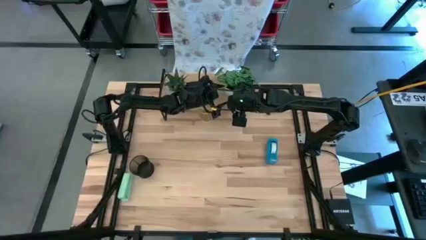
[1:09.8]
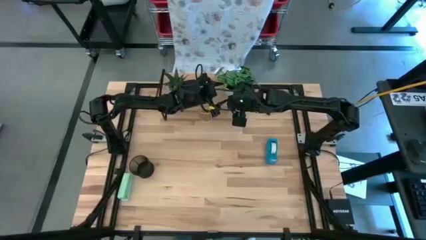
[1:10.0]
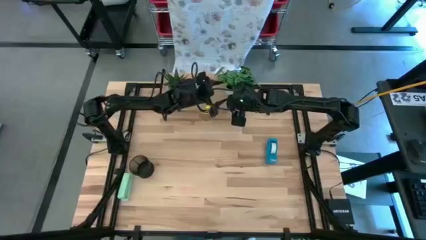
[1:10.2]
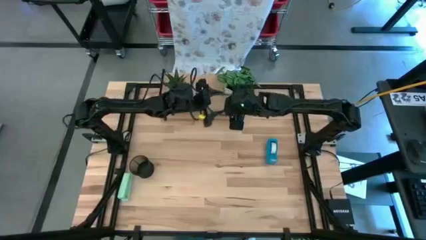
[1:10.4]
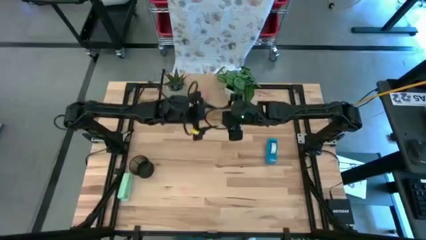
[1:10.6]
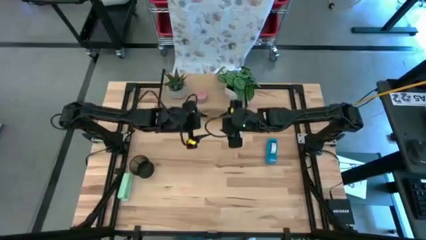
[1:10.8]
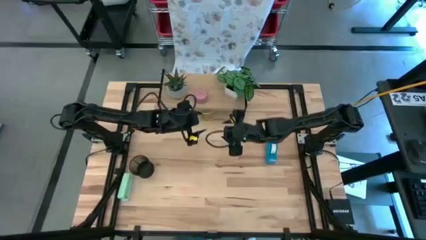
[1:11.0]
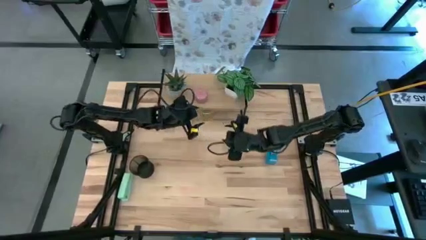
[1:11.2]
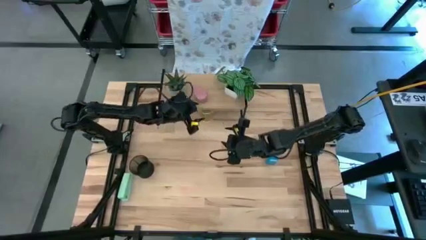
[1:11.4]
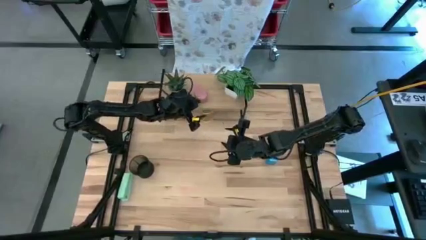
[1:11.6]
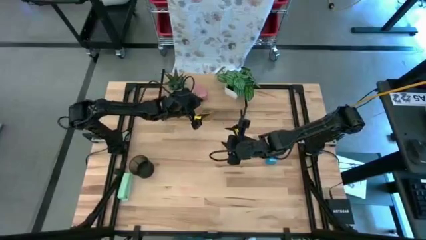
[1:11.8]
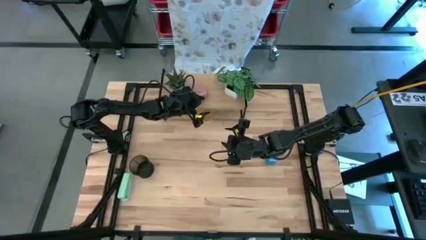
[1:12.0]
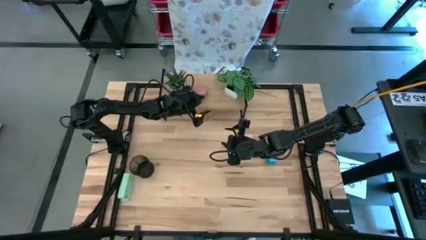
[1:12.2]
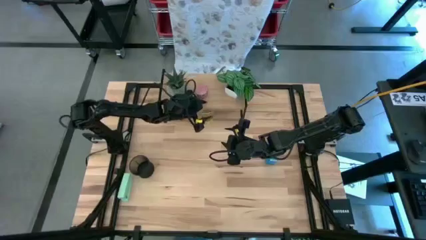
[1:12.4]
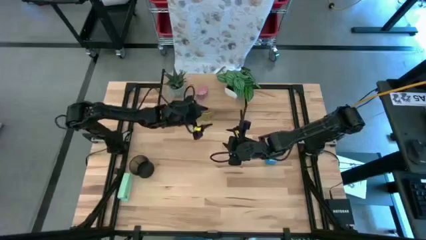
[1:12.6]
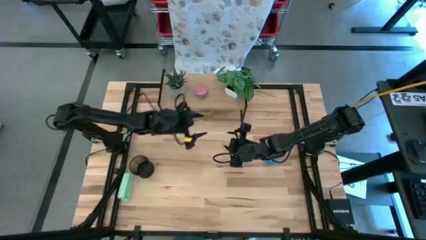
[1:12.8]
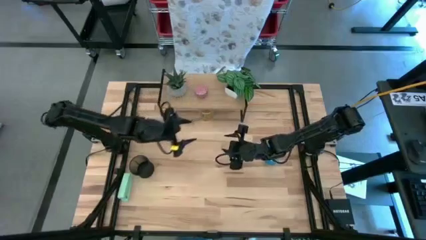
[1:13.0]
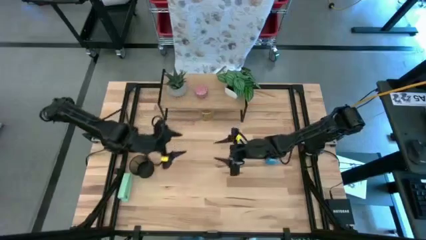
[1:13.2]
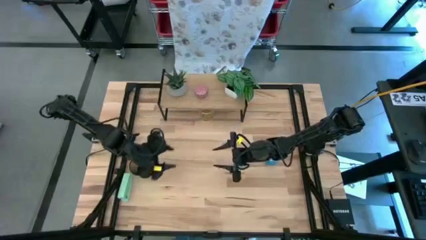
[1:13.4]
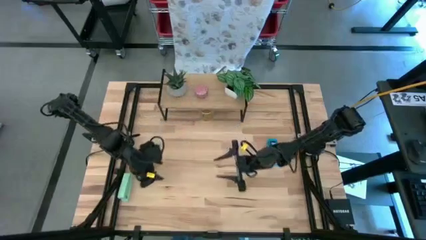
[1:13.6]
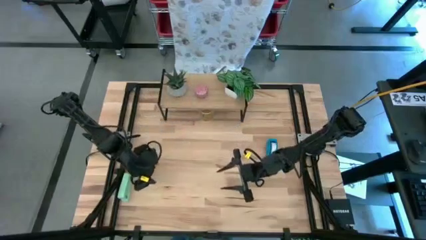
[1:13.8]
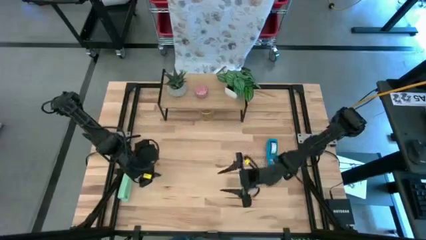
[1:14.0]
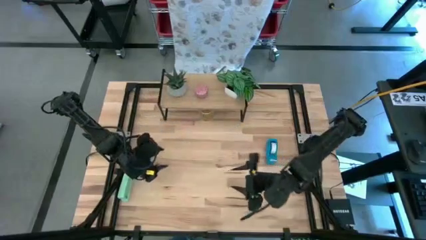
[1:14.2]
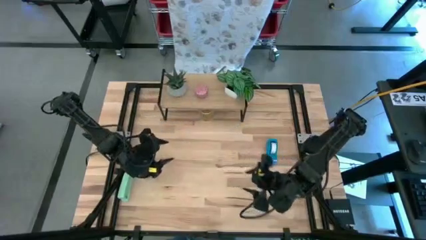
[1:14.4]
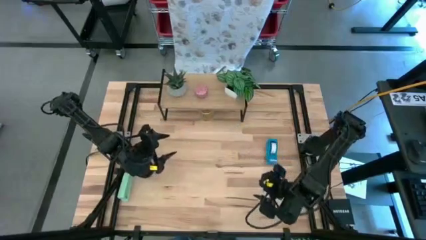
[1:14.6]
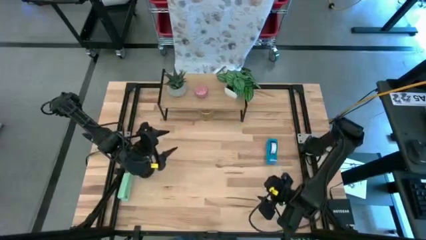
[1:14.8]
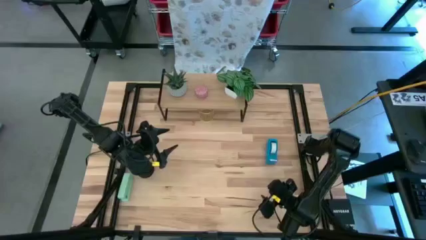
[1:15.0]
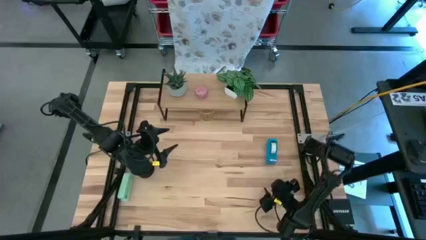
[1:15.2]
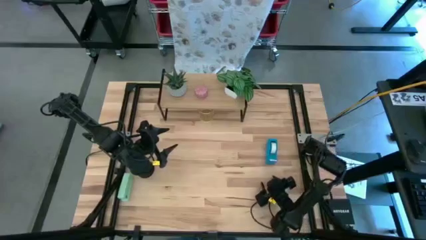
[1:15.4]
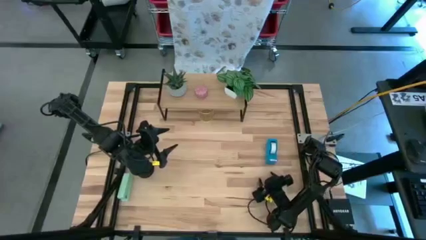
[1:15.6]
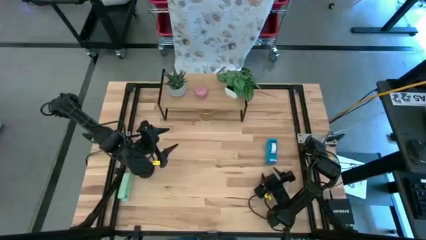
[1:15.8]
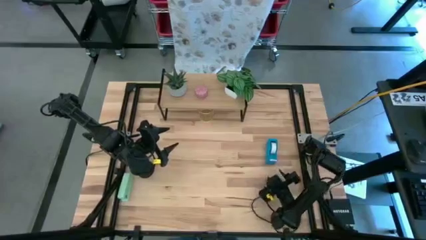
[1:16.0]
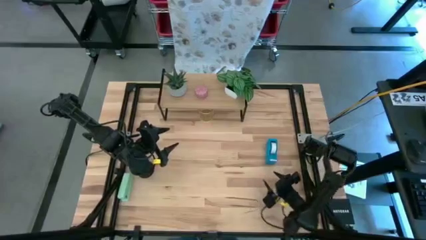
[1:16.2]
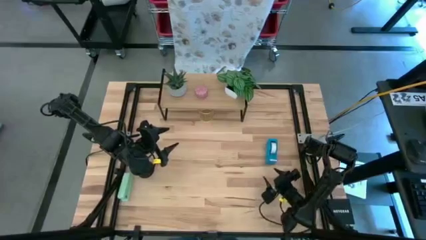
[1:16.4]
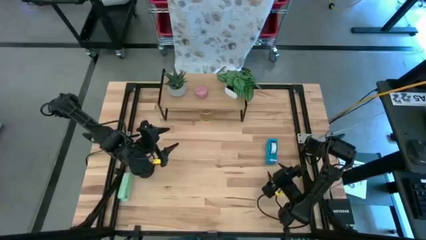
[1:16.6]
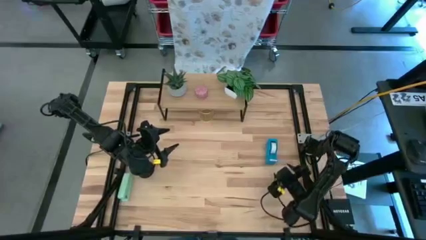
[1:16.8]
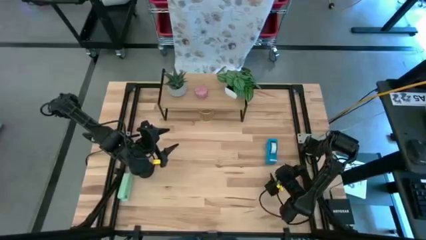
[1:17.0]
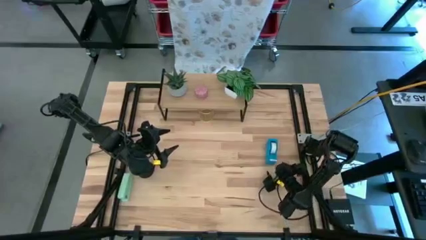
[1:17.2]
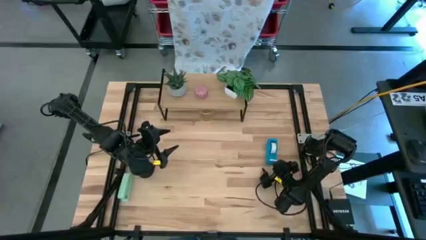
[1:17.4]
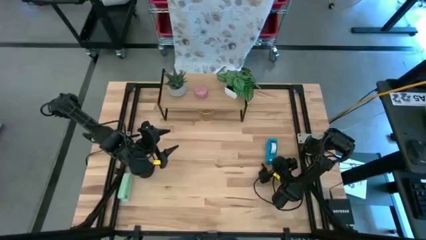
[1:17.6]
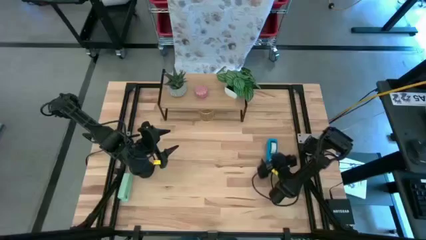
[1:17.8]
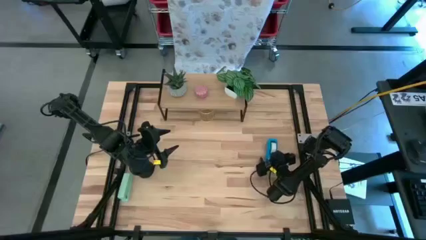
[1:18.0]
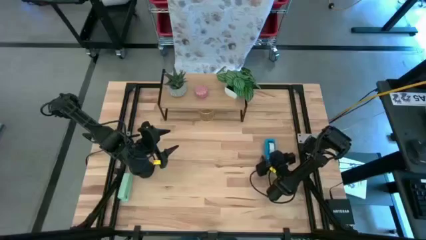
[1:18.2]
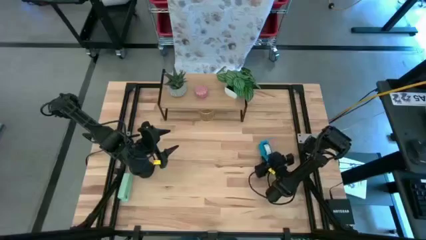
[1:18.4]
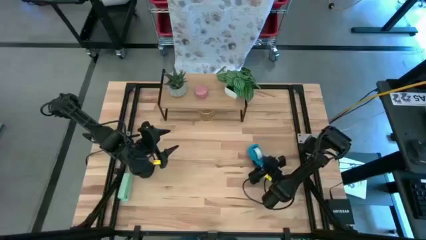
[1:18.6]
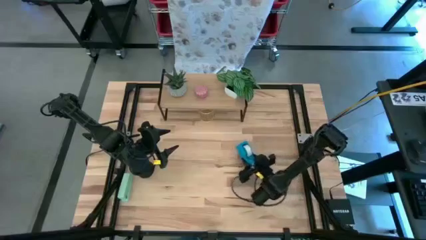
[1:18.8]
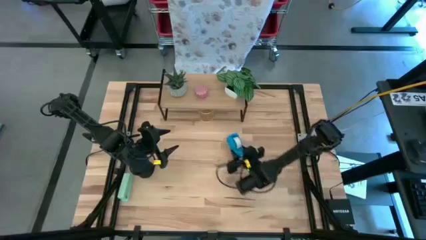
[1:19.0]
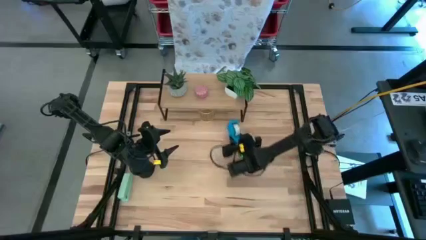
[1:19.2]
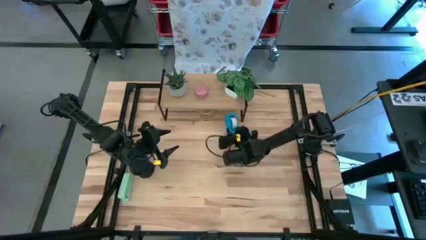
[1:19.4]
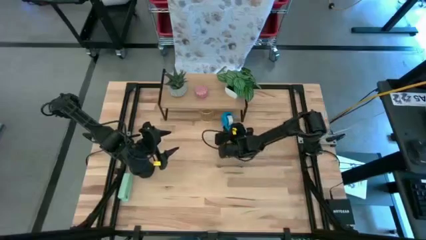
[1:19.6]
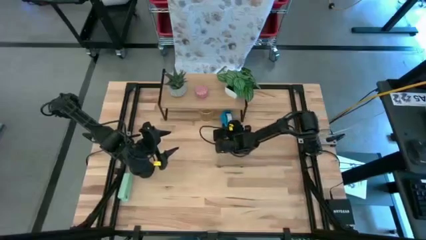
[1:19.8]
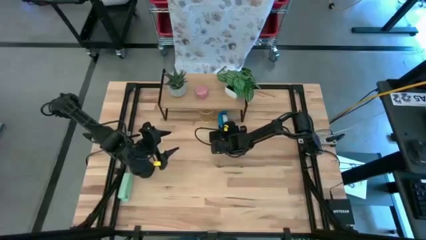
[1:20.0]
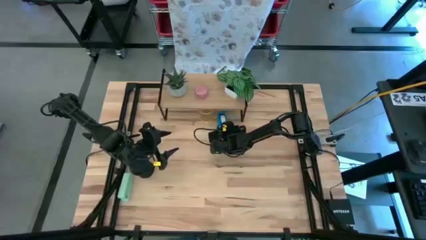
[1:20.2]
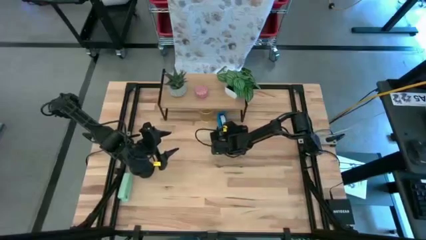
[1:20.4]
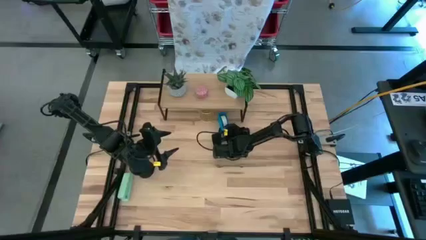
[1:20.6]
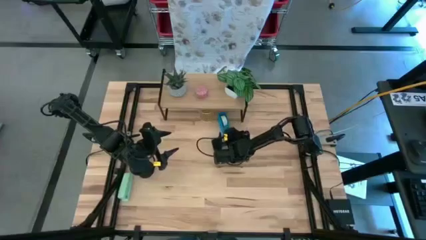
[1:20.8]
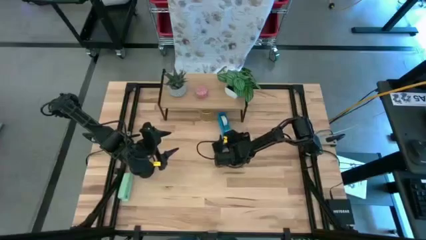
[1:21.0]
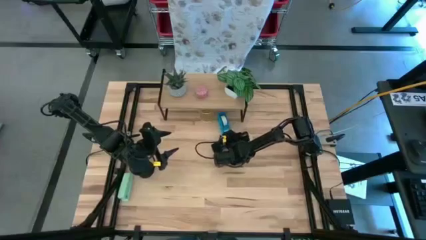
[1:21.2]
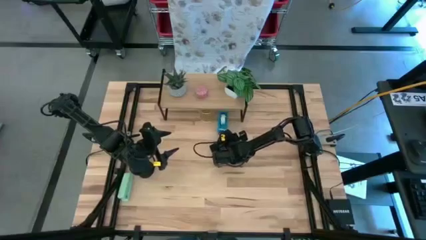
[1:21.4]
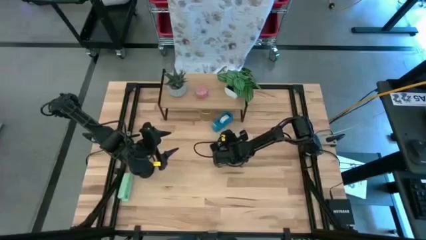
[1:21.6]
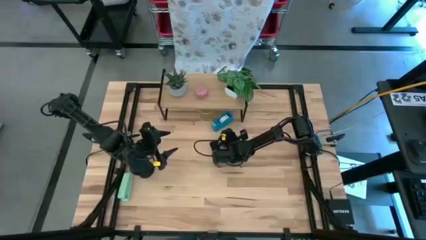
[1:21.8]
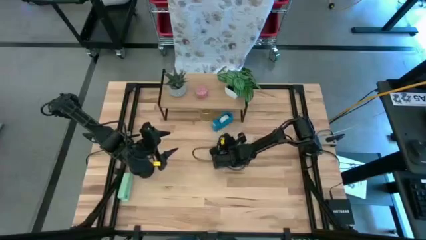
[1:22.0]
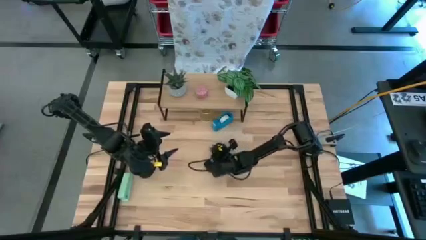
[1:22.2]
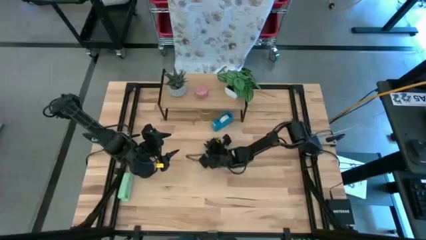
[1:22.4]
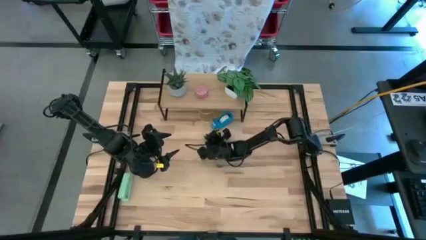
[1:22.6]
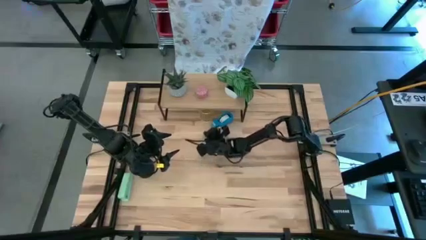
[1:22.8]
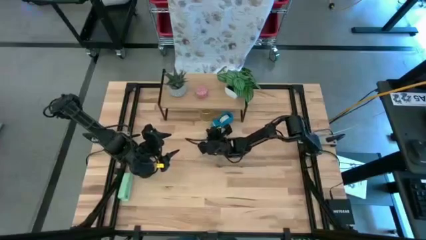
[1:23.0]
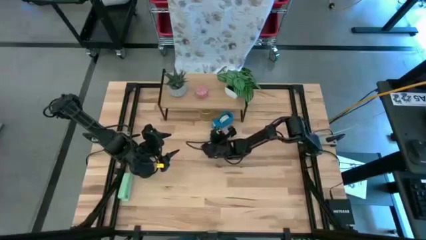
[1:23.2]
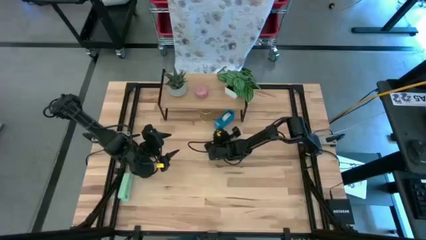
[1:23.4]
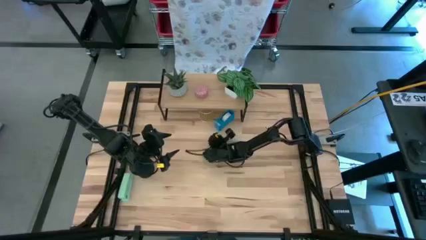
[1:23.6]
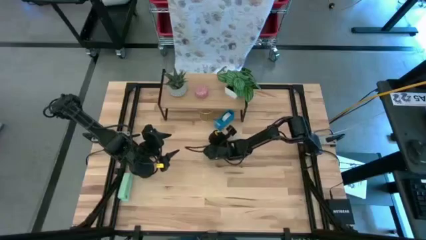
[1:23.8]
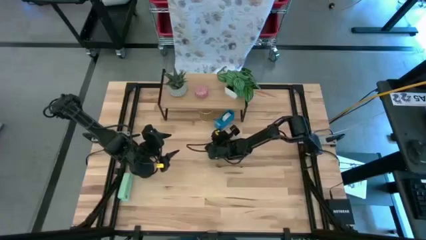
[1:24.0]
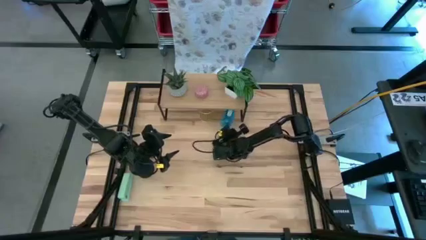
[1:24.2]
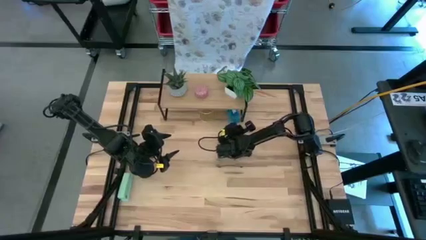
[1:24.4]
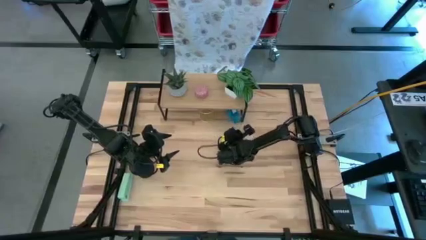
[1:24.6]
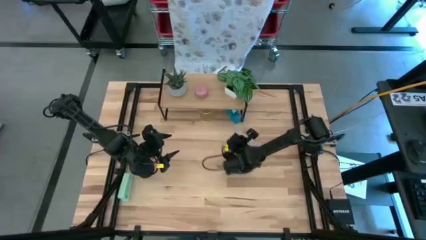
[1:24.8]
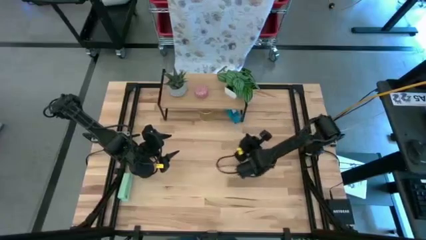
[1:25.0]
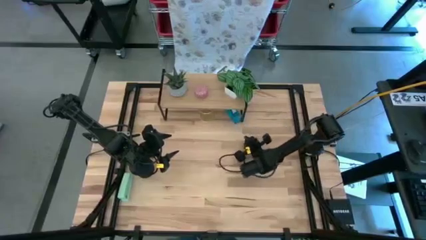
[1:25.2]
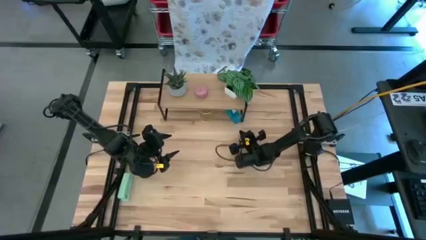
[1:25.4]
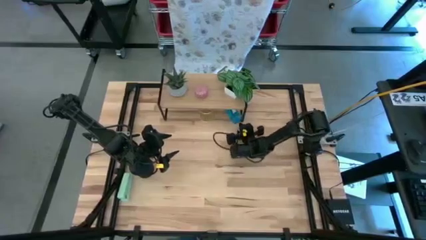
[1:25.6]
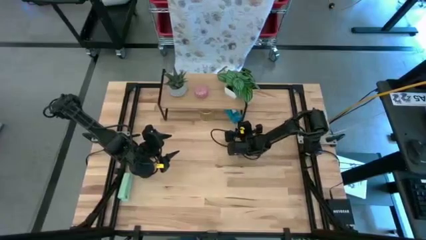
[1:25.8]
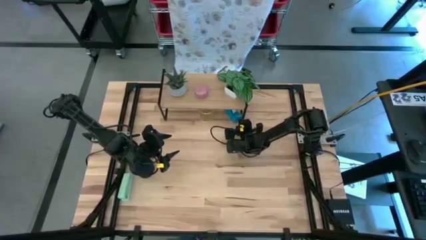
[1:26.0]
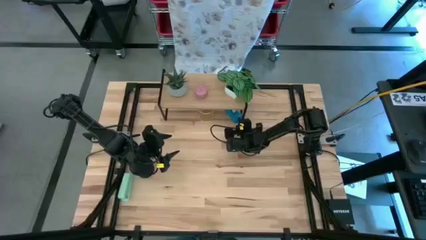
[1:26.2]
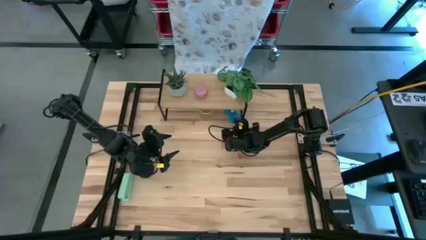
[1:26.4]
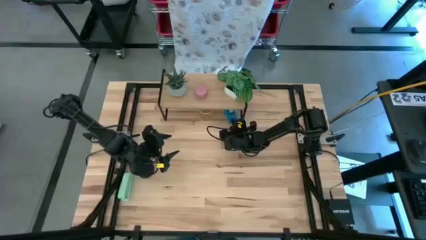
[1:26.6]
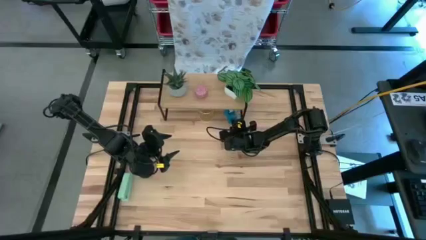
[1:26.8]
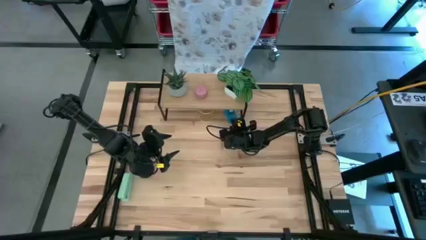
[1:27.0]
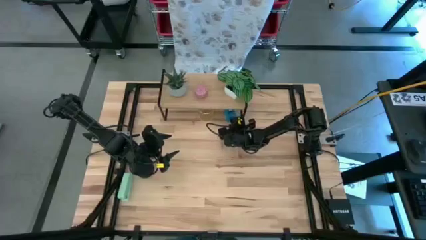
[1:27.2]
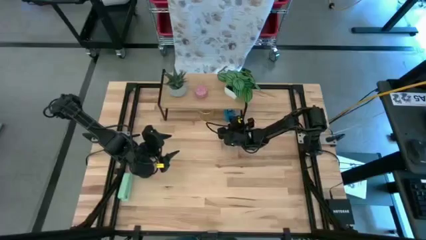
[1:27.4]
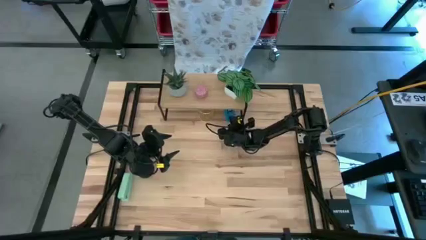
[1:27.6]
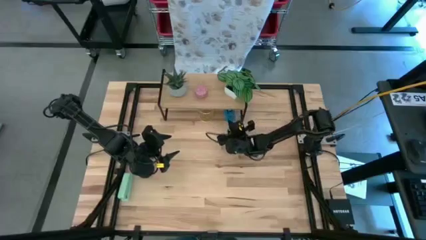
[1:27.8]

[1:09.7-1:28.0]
Task: Stock shelves
Move the blue tape dispenser under the desk shelf
